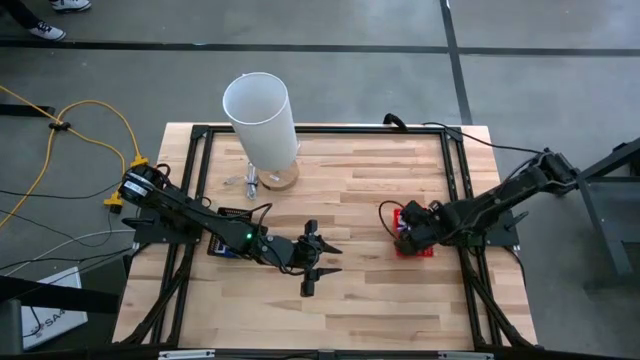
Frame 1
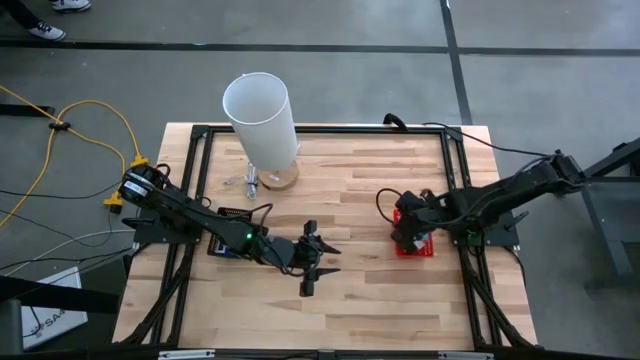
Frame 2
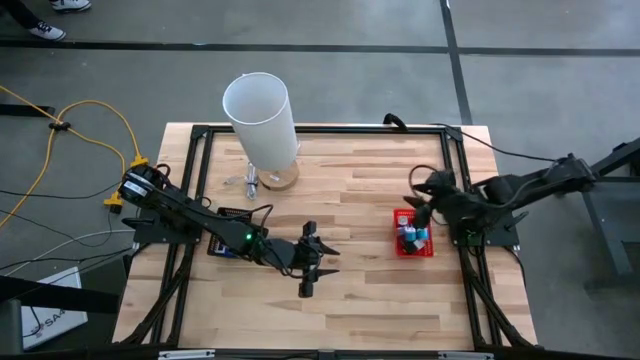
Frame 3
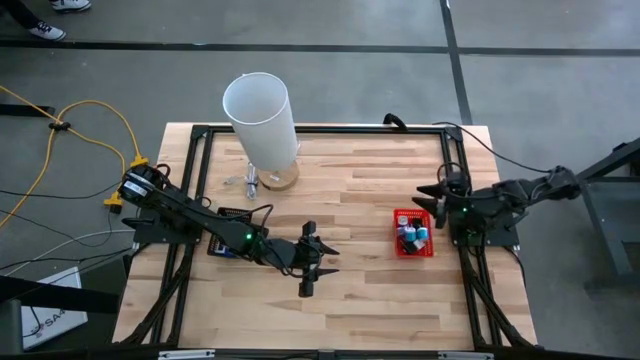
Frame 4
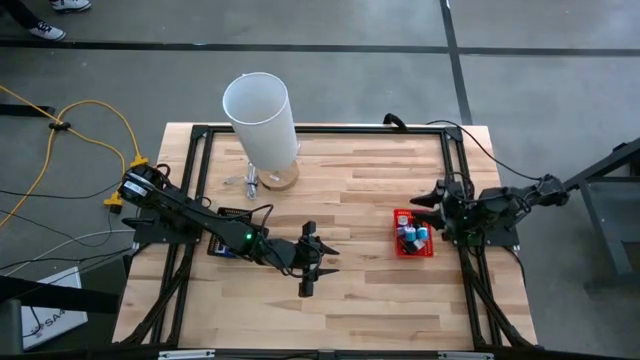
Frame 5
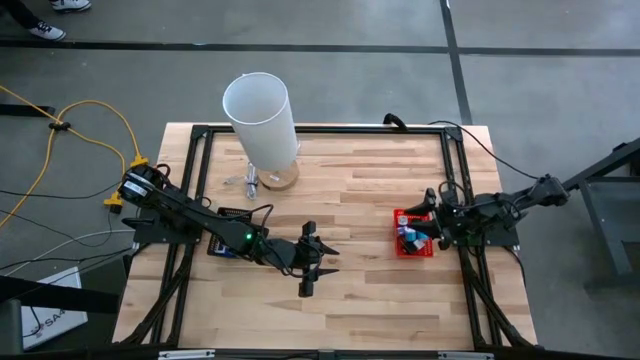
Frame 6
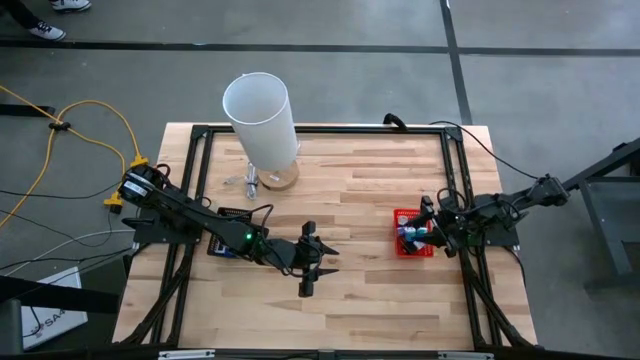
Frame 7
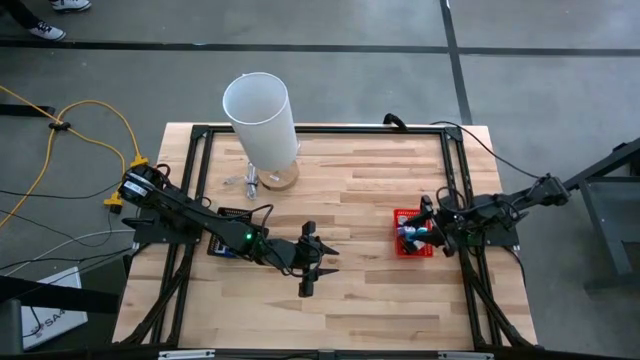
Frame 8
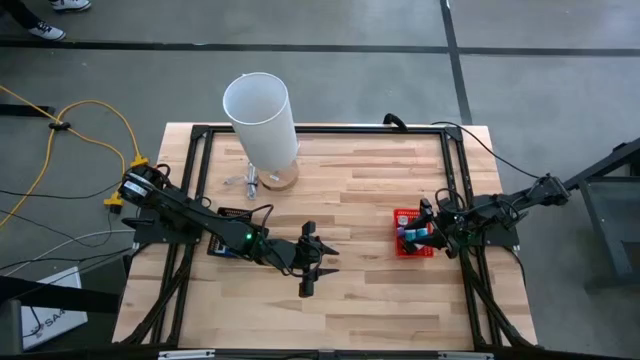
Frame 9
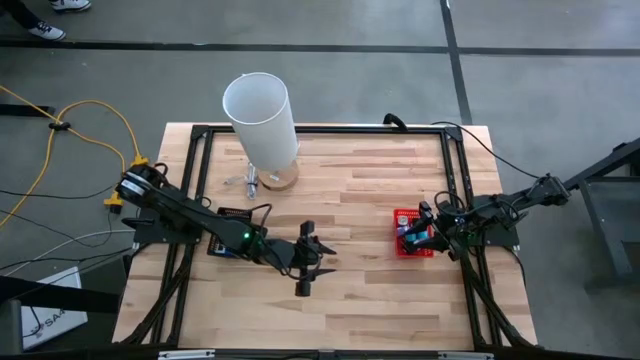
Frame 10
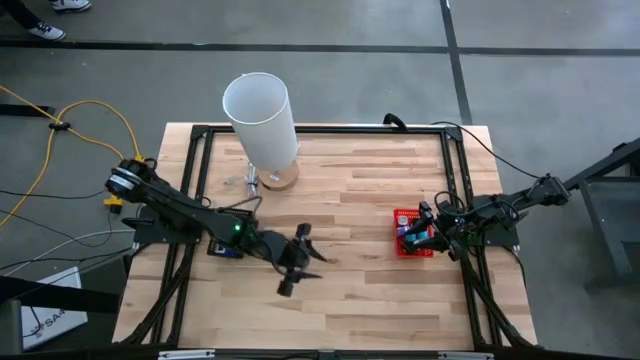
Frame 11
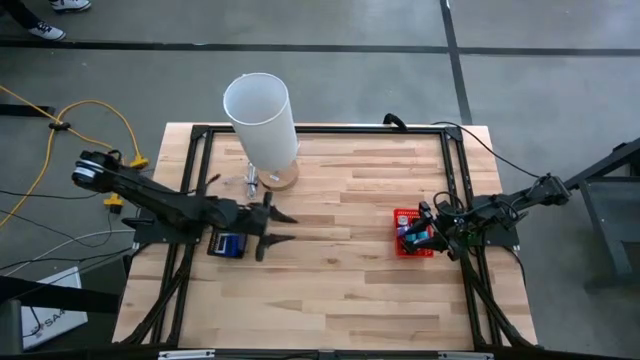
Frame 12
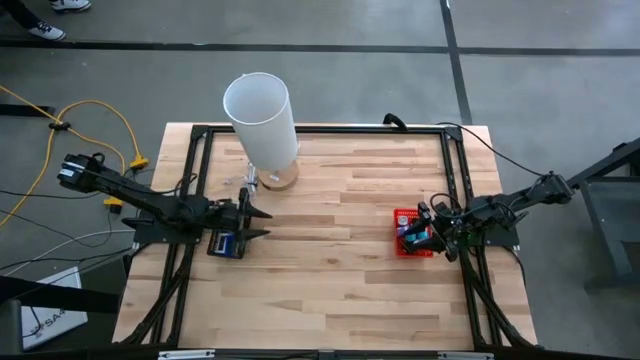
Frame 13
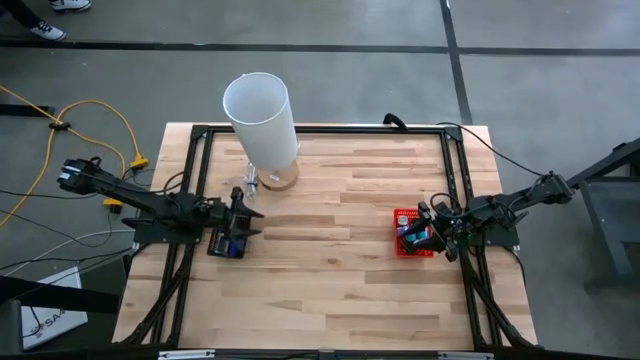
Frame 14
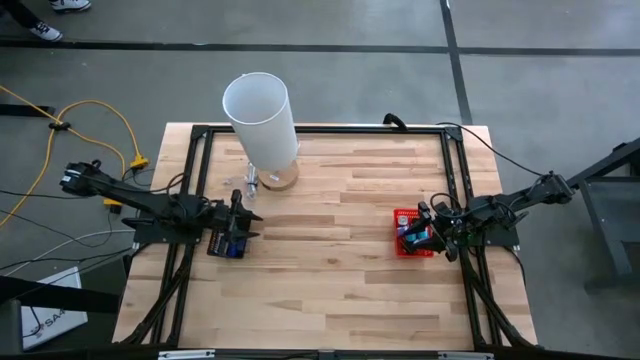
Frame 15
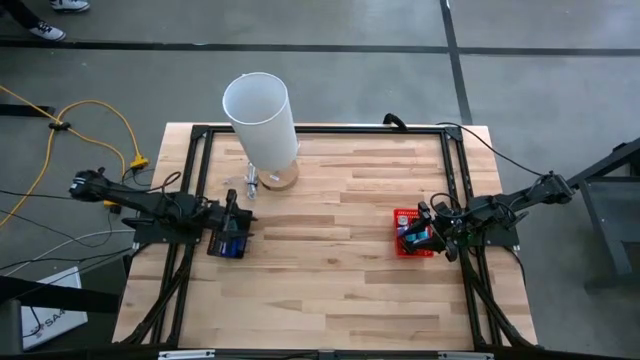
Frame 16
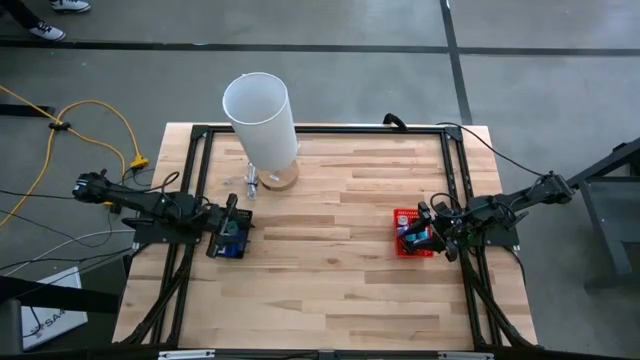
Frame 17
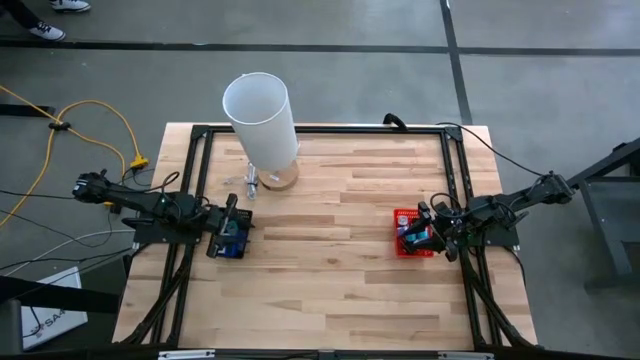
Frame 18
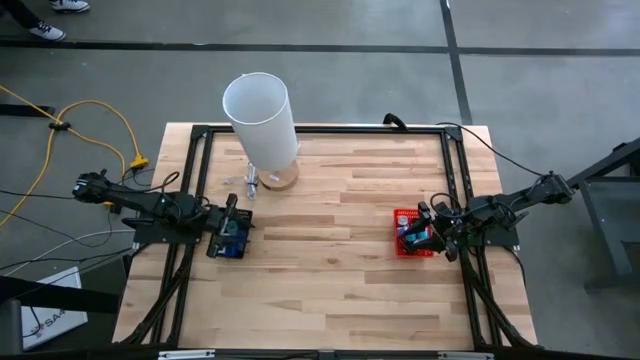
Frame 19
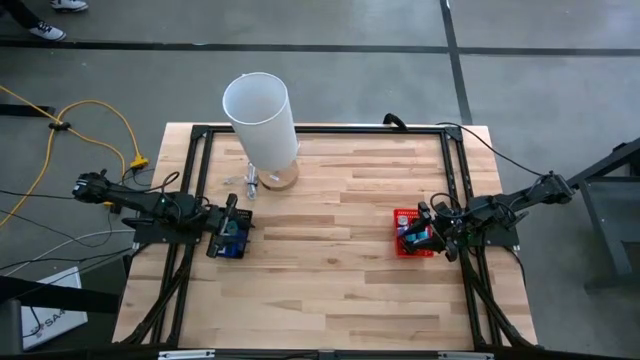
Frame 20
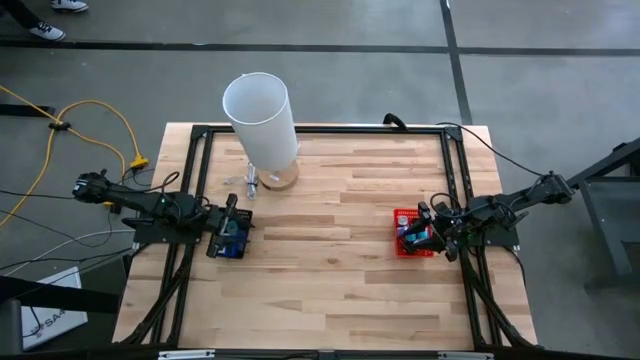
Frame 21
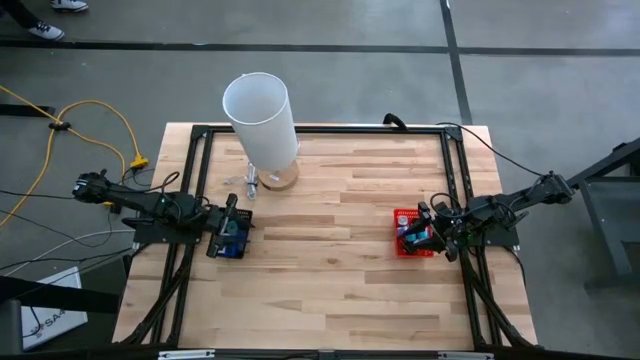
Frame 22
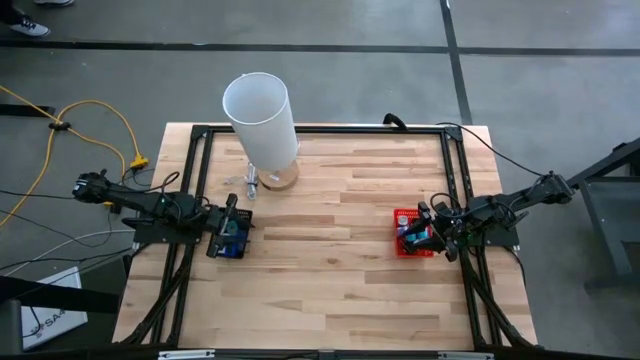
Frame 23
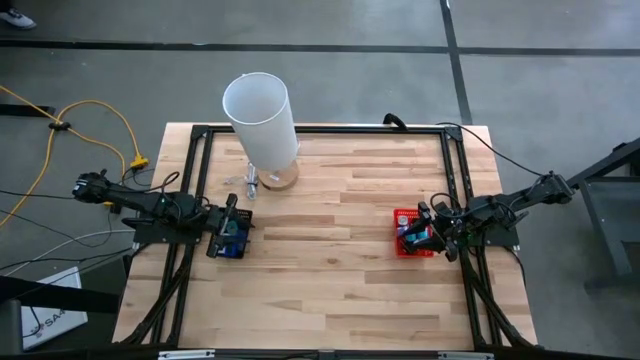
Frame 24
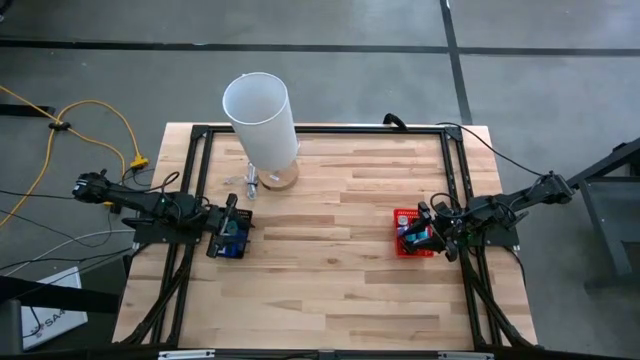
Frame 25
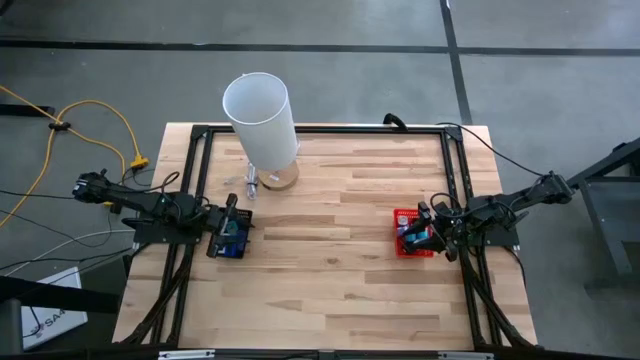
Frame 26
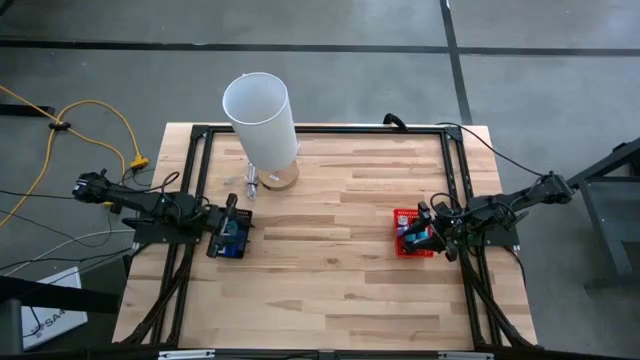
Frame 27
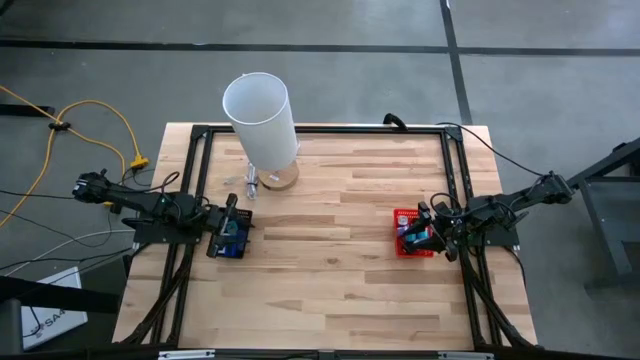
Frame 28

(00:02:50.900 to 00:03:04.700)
Task: Pick & Place Office items
Return to Home Position

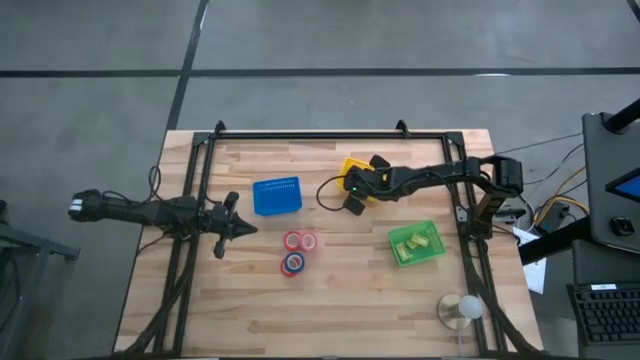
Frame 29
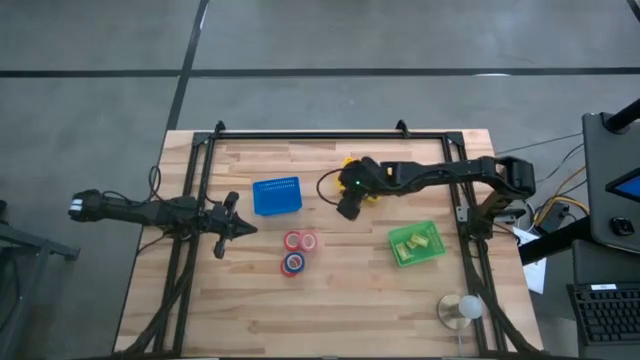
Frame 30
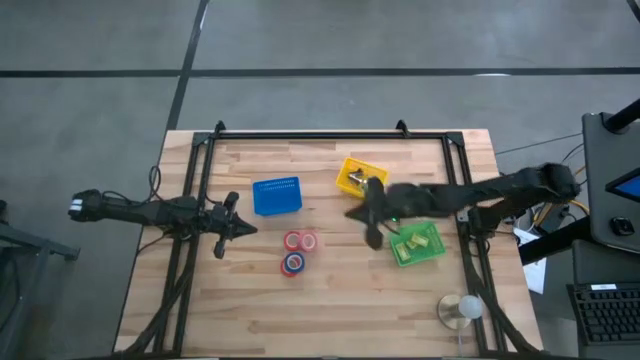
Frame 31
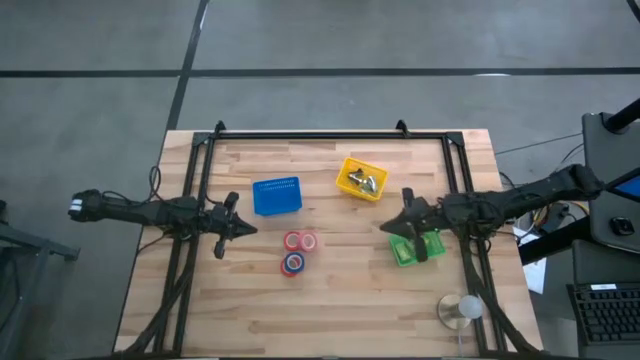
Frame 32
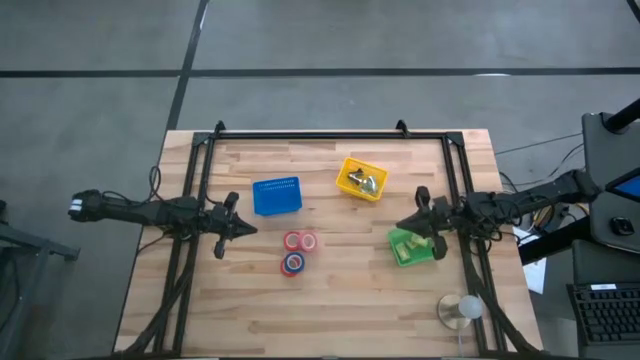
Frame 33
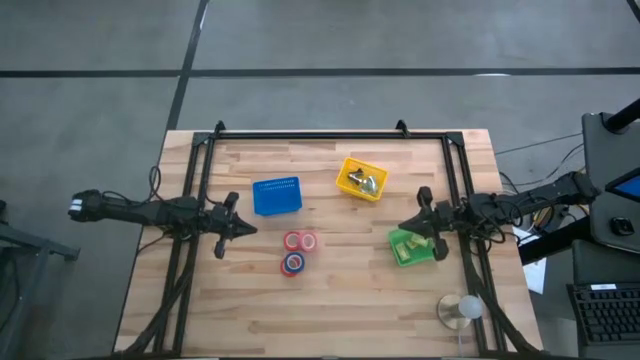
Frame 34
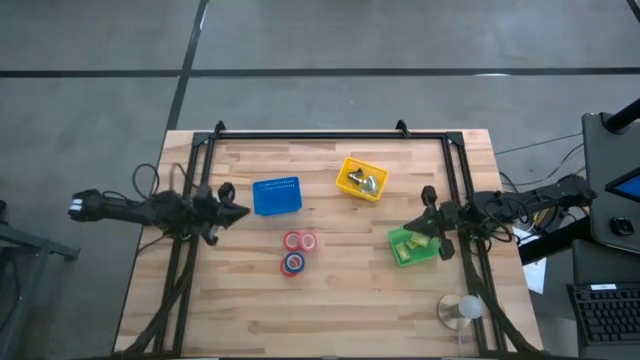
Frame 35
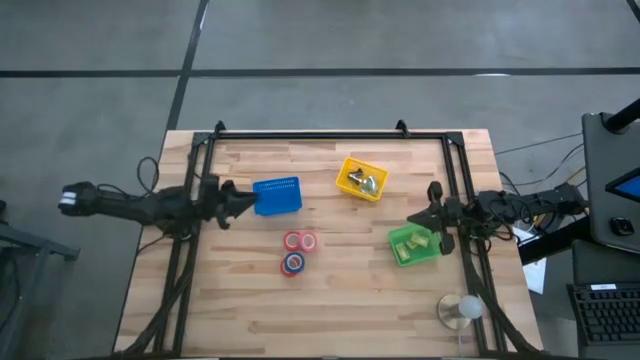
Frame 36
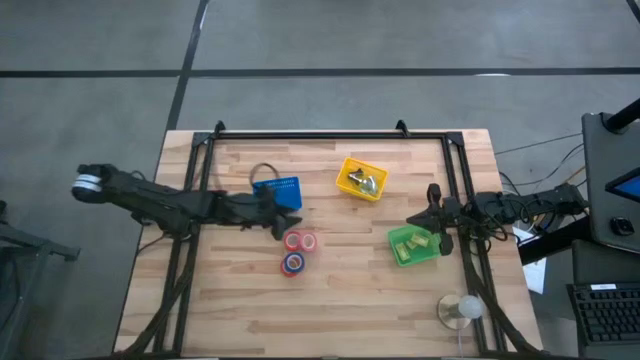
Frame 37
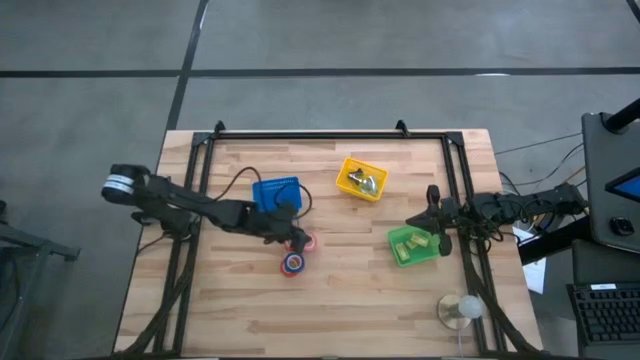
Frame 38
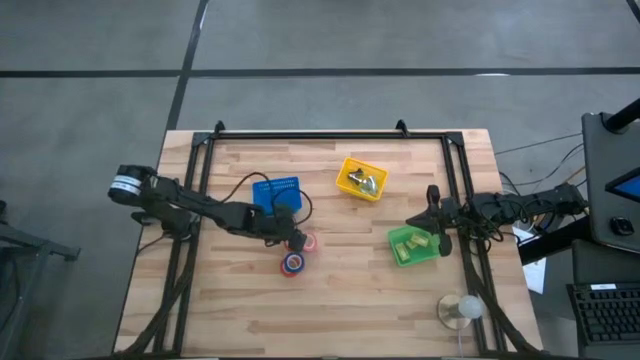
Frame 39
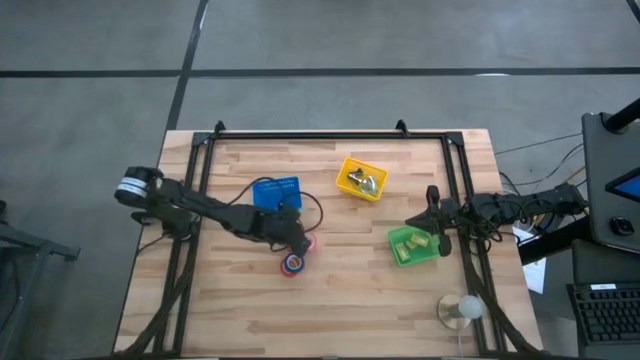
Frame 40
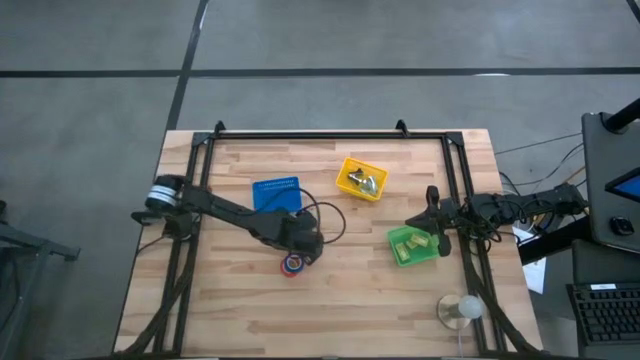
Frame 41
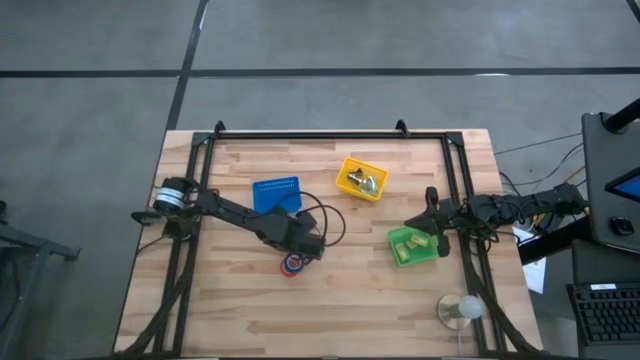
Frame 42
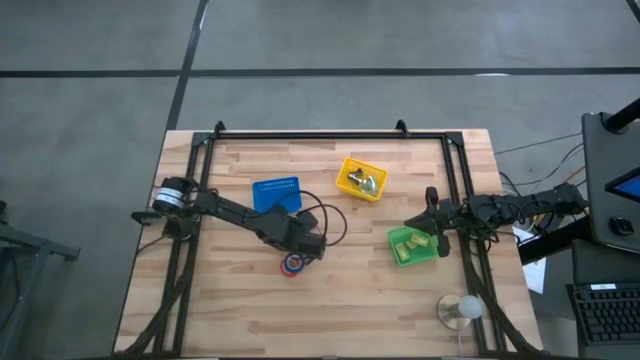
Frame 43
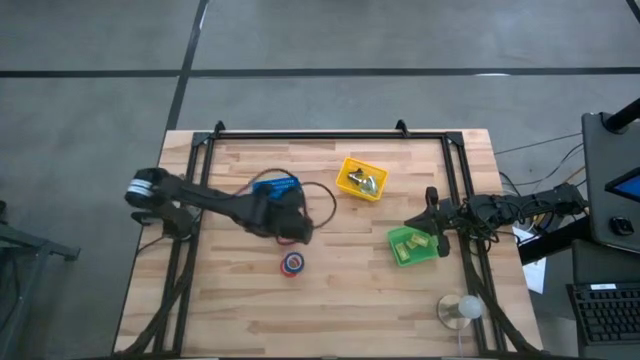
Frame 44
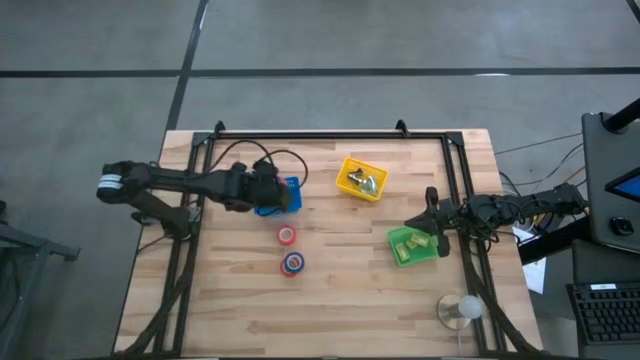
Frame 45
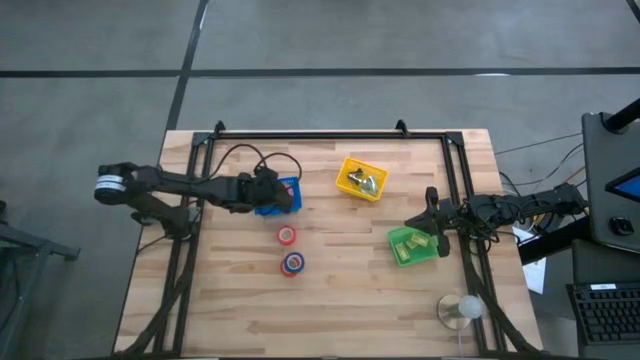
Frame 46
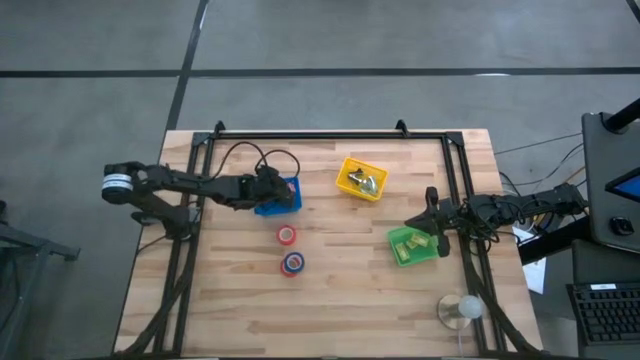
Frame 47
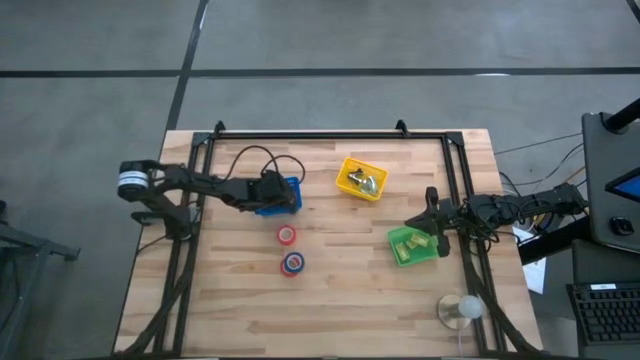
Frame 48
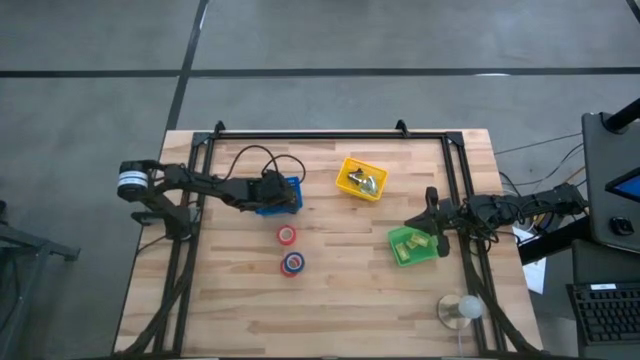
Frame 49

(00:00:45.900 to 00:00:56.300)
Task: Pick and place Stapler, Stapler remover, tape
Put the pink tape into the blue bin
